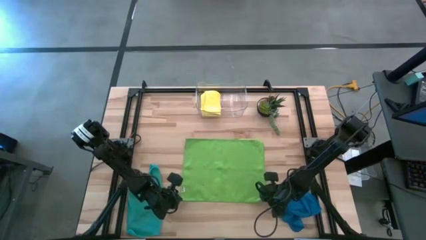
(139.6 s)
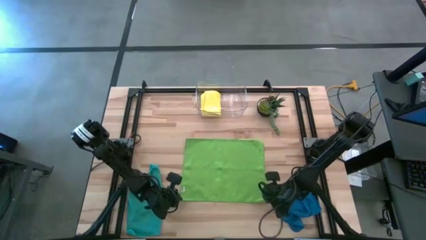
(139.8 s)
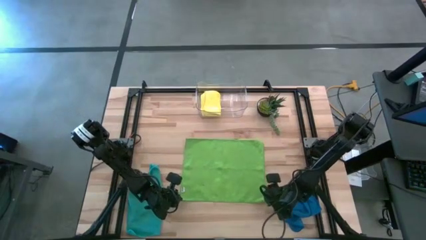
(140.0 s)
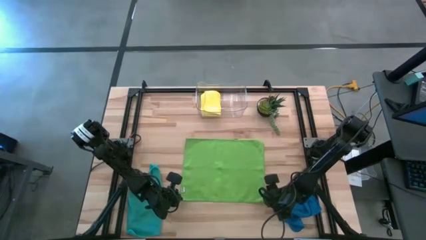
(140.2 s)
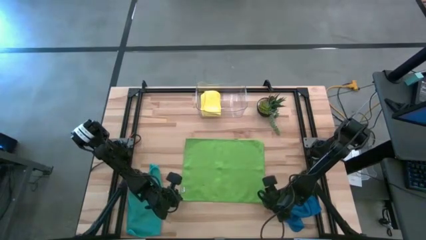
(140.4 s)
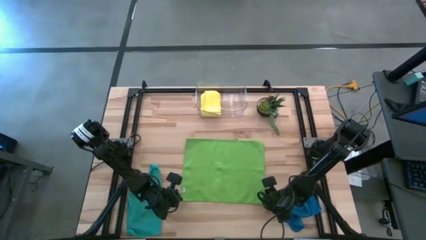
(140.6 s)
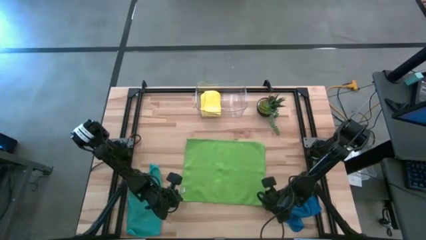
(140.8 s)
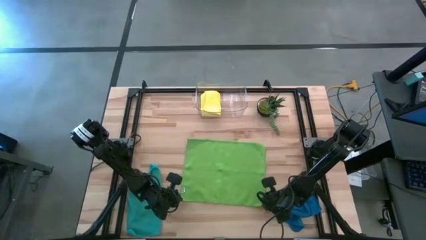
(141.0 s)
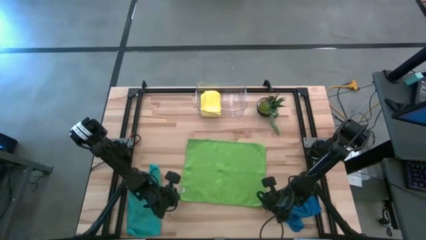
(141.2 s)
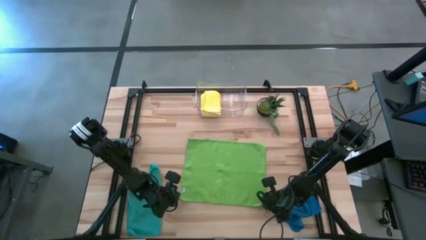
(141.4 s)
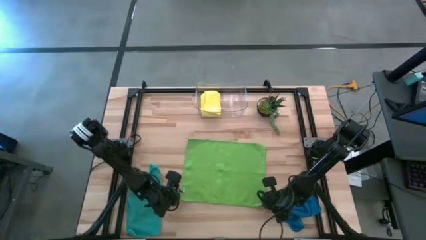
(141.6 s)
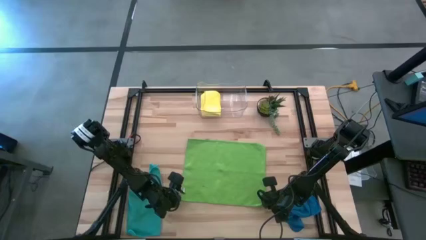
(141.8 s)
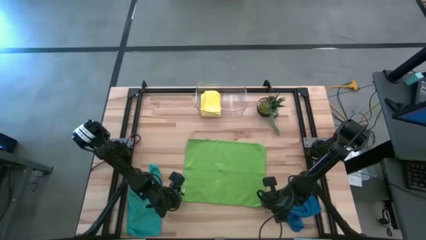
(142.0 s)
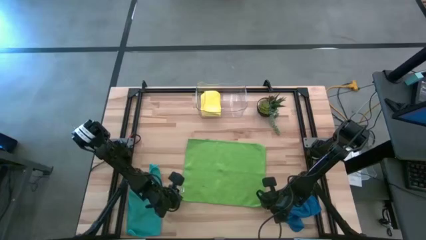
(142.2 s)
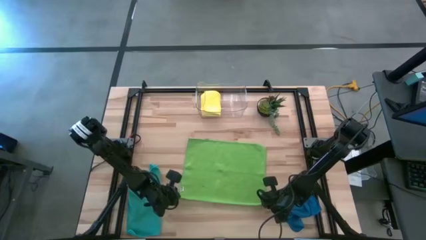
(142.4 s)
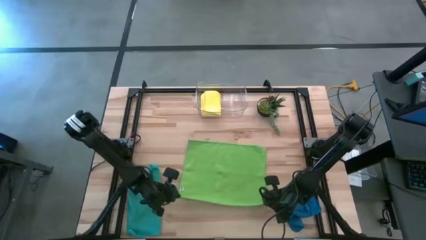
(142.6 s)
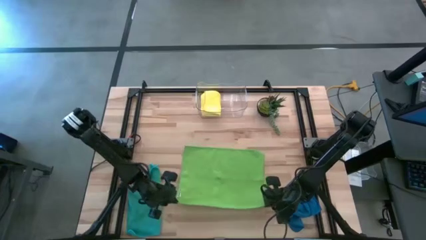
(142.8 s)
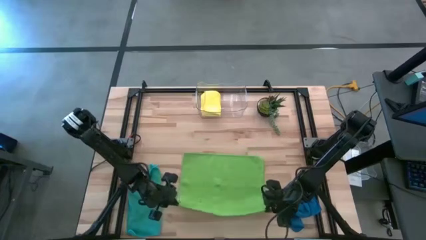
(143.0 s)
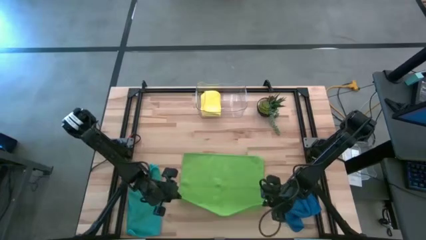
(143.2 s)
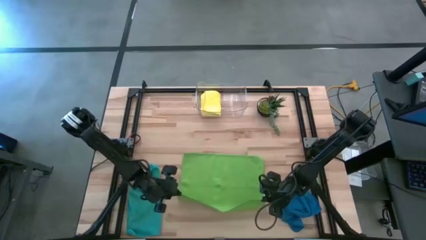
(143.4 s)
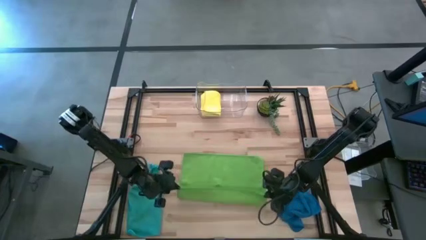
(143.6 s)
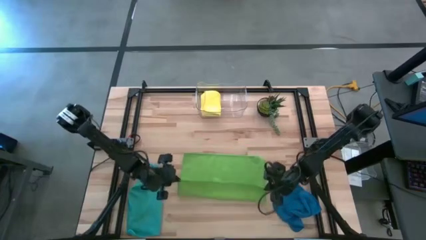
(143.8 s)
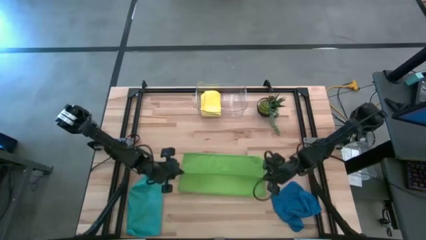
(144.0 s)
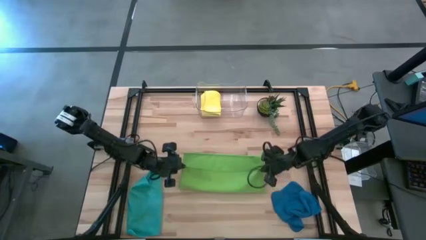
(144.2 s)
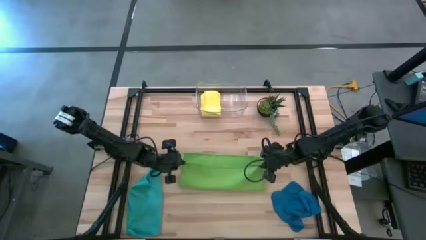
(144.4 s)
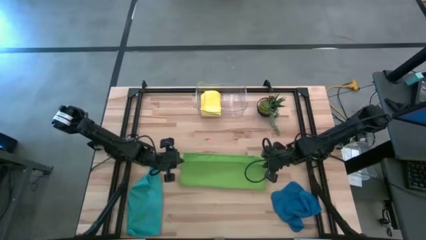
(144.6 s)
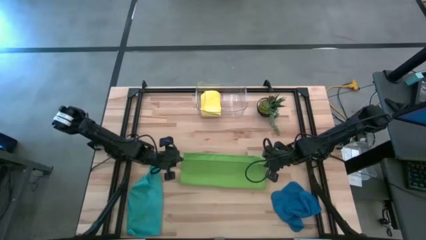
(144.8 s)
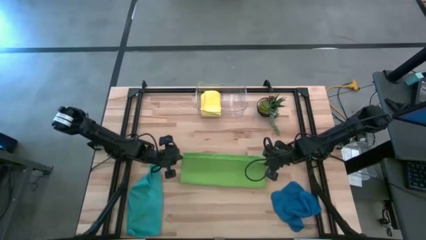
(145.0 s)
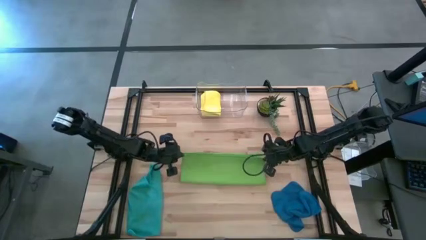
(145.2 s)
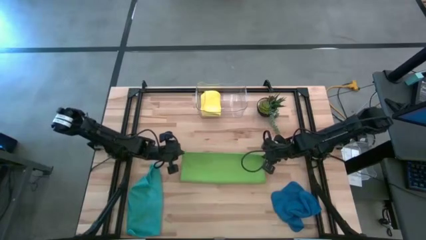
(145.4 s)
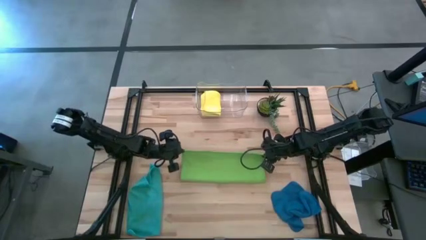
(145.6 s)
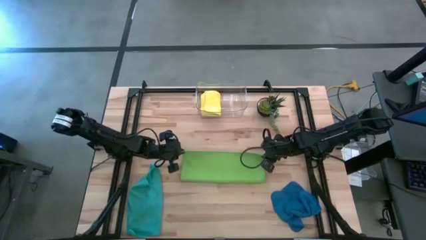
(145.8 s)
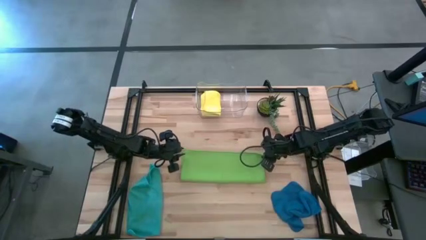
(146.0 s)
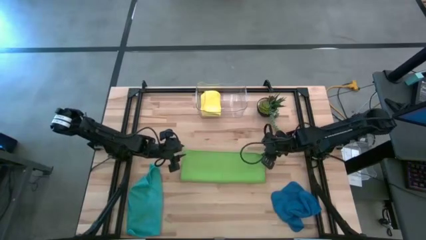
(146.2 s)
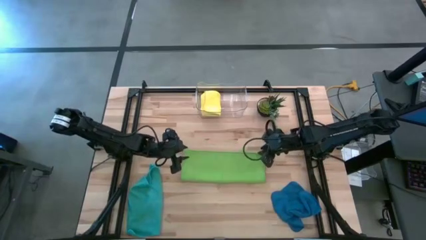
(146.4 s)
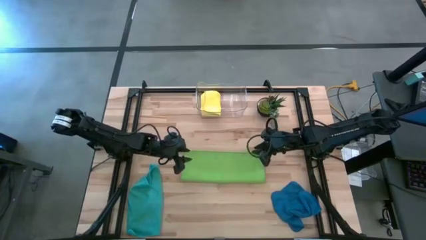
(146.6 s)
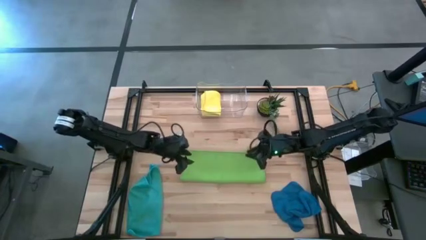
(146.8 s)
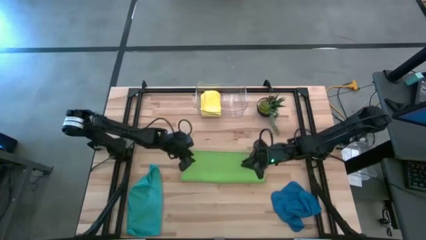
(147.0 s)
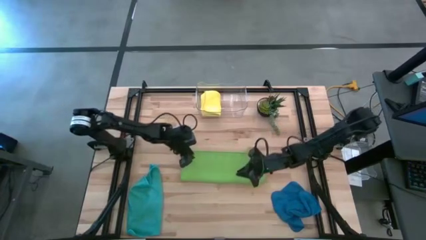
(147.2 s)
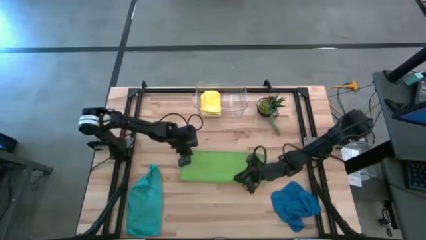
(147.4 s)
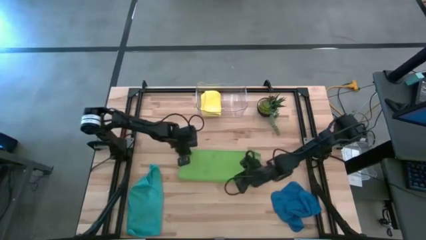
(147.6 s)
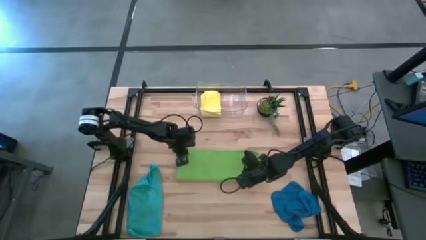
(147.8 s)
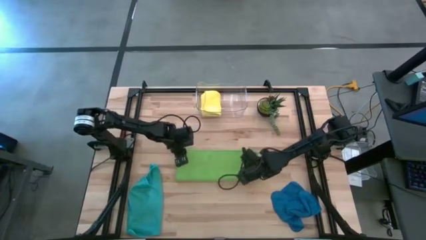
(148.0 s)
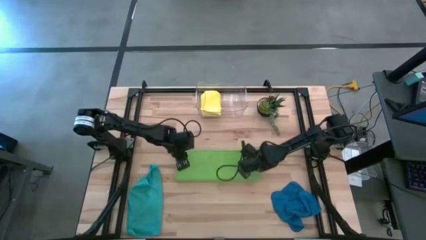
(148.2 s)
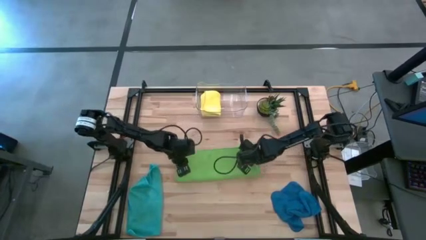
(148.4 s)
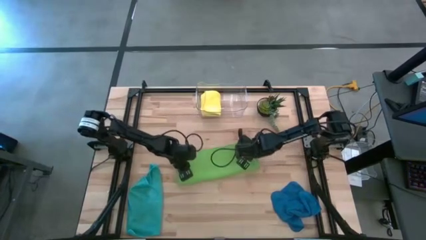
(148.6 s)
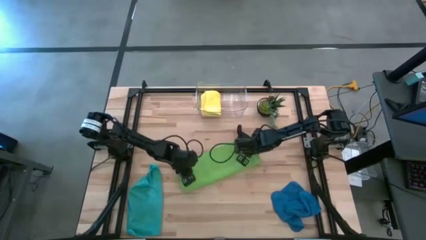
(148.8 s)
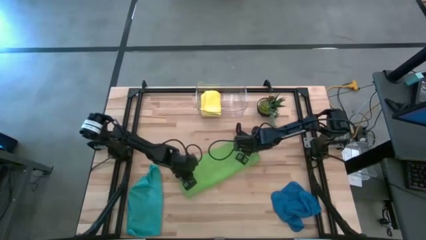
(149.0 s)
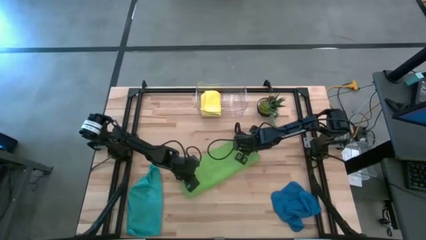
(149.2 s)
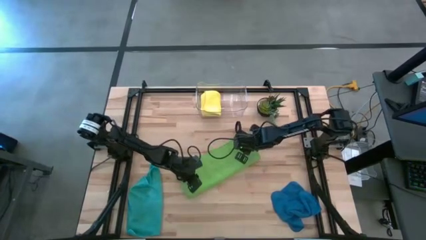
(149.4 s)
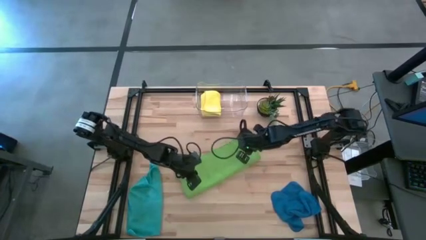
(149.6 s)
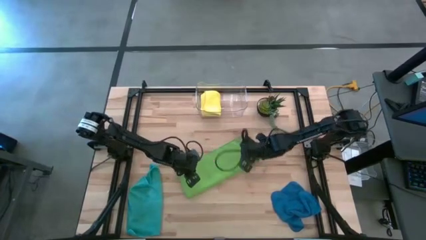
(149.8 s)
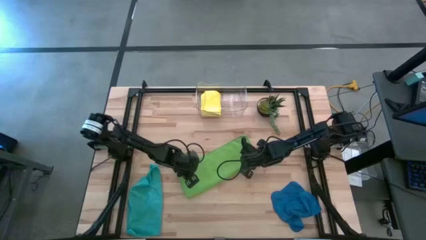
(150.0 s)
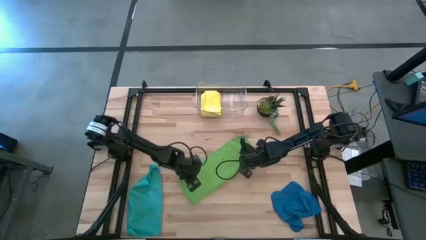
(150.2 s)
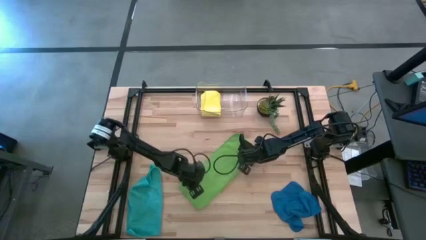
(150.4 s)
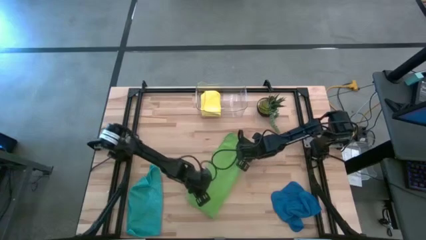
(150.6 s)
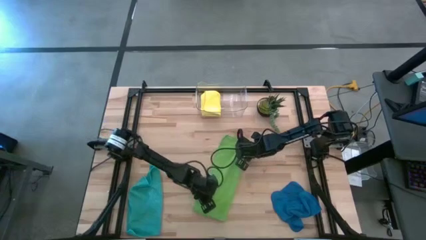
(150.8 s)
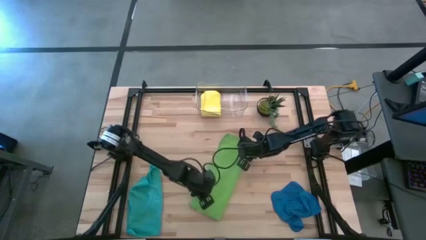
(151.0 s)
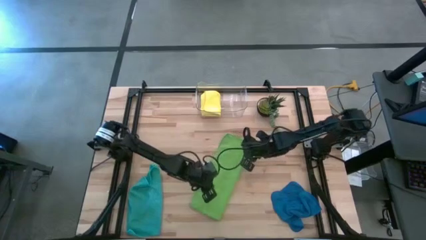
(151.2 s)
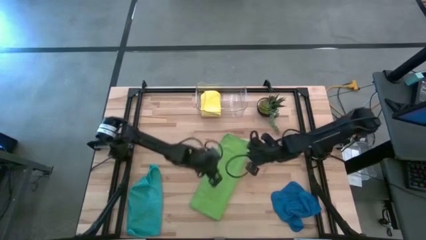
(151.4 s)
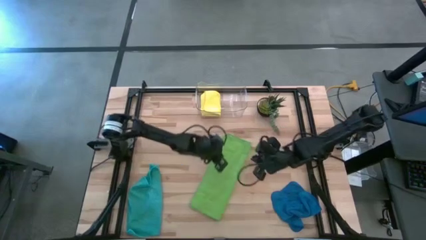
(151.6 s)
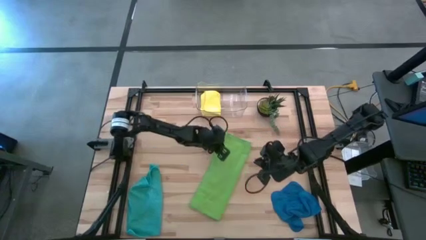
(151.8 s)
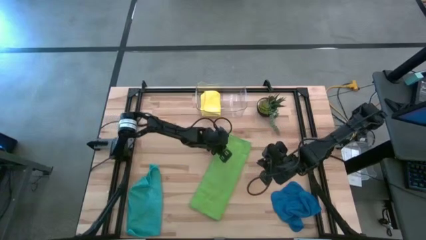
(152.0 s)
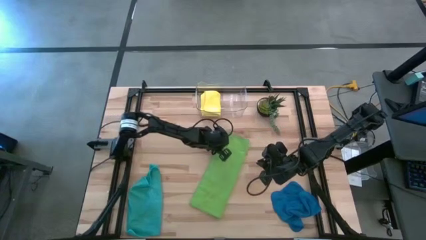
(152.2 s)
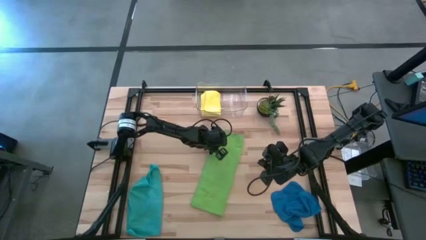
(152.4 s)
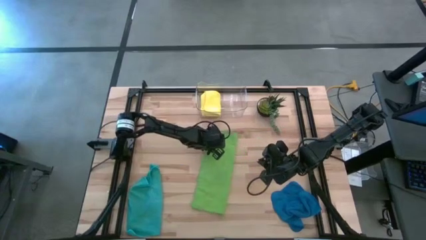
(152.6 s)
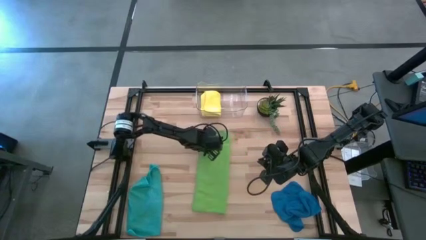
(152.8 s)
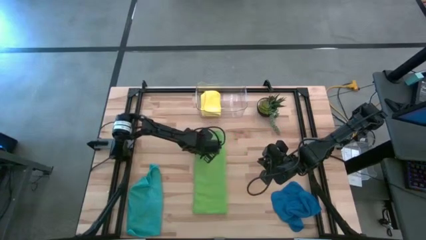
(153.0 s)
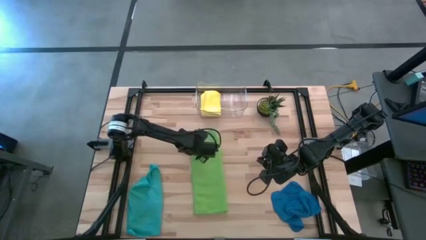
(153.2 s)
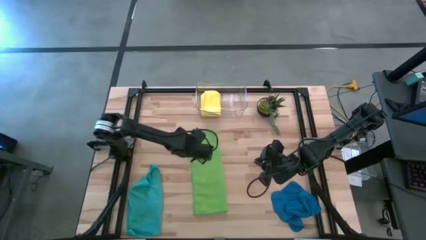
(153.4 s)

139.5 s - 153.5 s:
Task: Fold microfiber towels
Fold the green microfiber towel

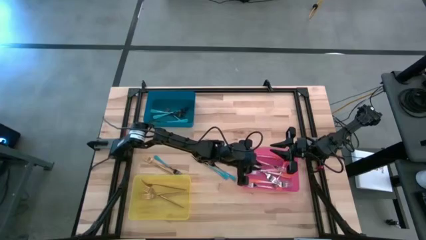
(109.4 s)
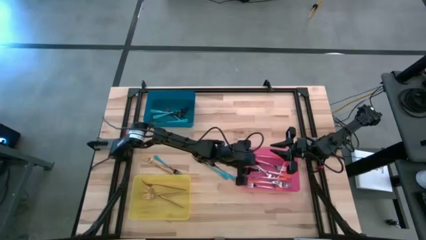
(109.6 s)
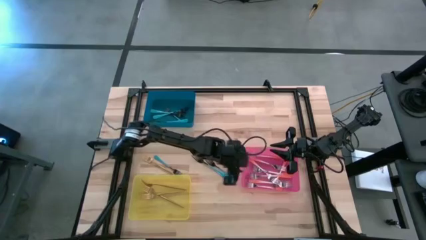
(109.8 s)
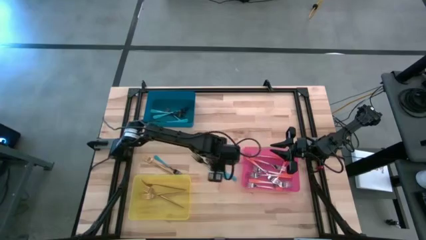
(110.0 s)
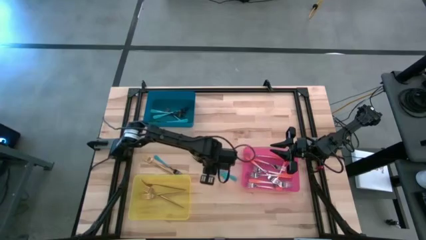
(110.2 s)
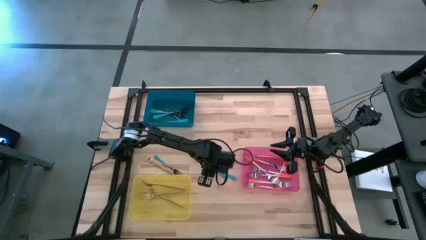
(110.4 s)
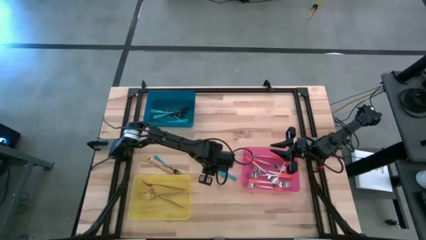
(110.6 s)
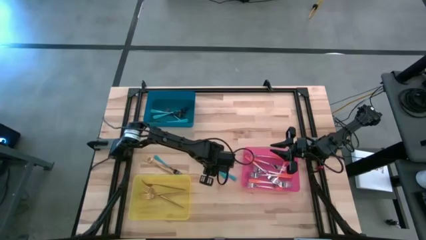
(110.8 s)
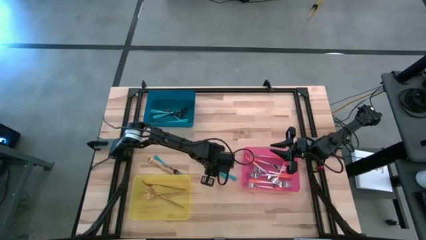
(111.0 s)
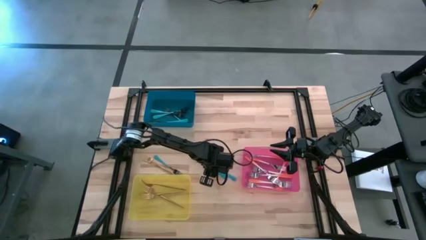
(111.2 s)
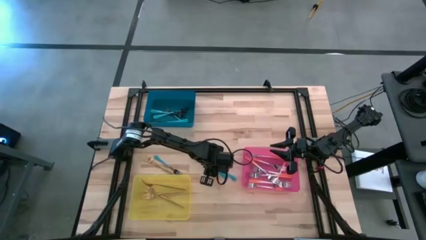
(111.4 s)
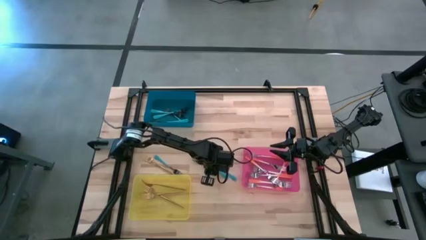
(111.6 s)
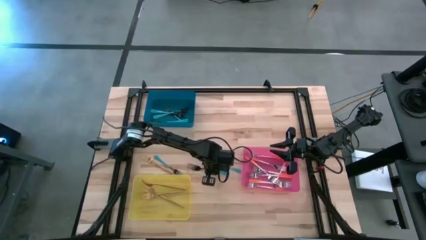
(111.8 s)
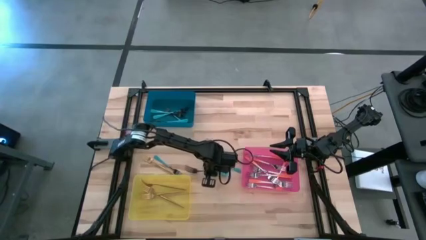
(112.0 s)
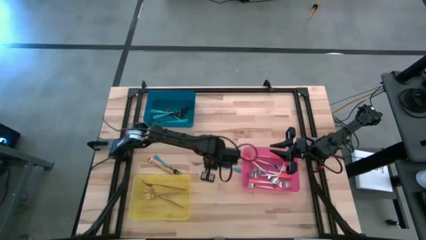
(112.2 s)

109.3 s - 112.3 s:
Task: Sort silverware by color (type)
Put the blue fork into the blue bin

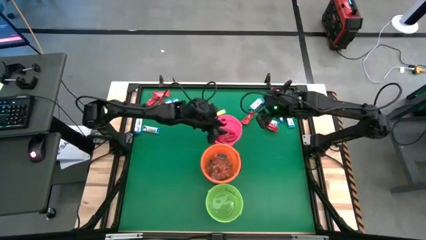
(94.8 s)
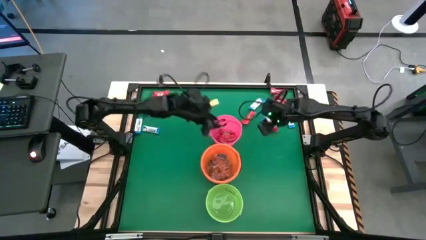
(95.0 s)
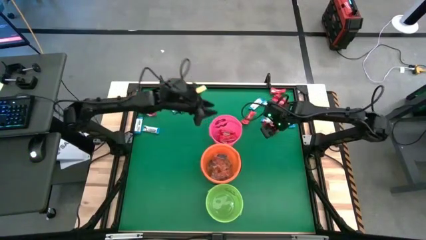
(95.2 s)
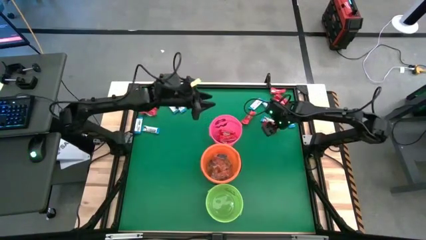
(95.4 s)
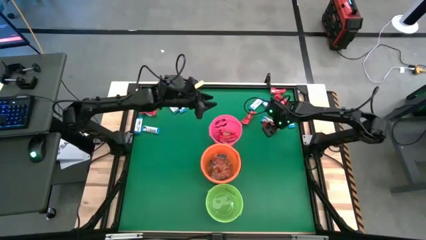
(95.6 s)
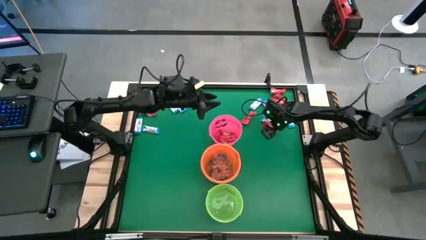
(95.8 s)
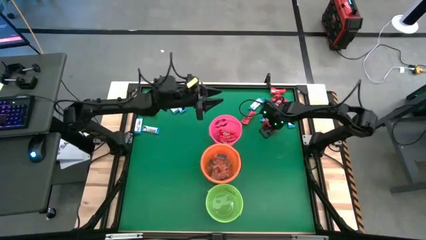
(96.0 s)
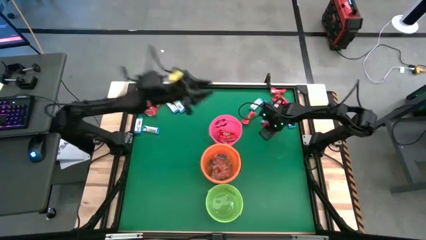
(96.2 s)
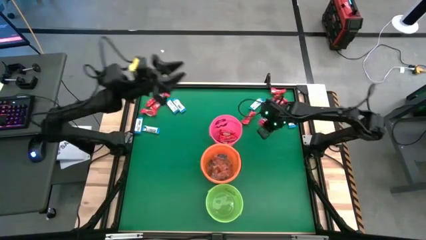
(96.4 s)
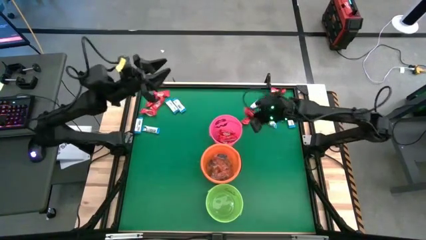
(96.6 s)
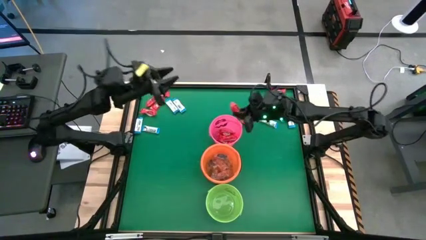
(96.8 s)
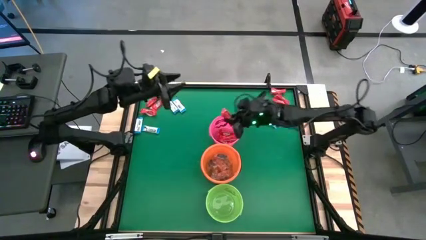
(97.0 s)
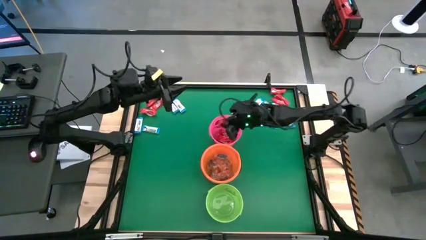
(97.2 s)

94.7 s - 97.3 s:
Task: Sort candy by brand, put in halloween buckets
Put the red chocolate into the pink bucket
